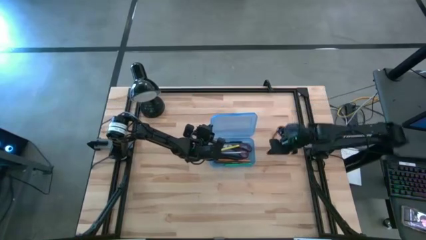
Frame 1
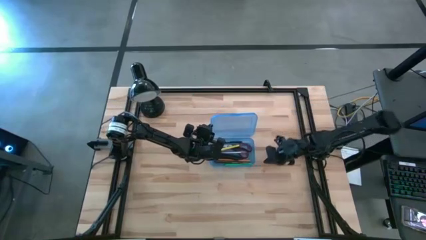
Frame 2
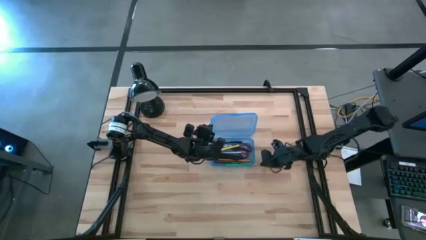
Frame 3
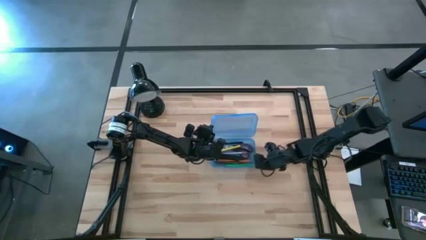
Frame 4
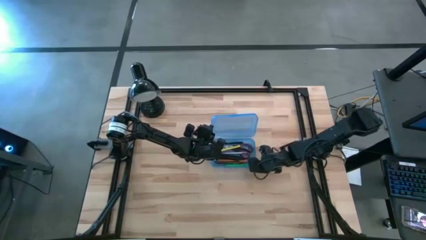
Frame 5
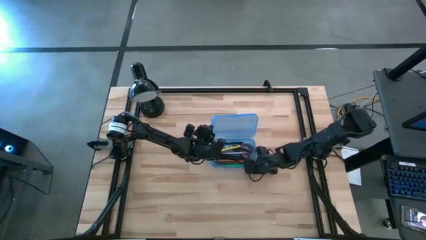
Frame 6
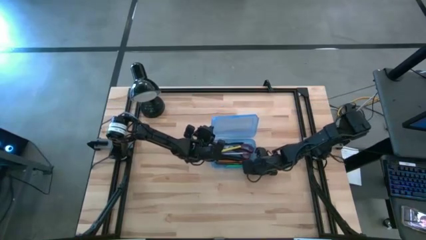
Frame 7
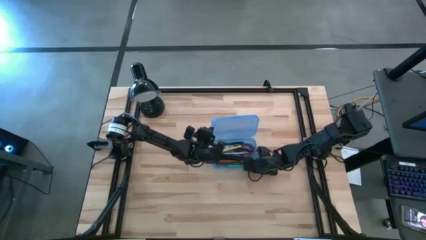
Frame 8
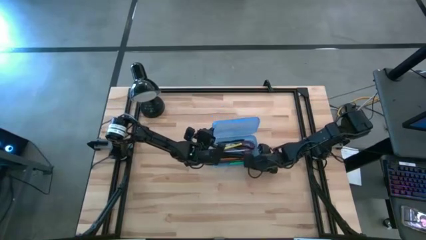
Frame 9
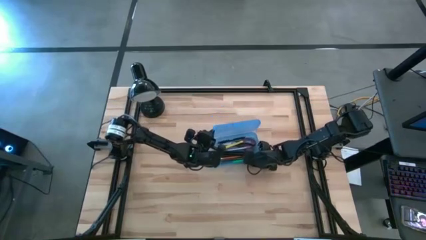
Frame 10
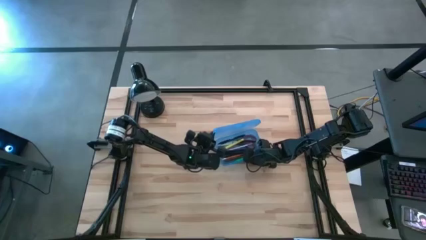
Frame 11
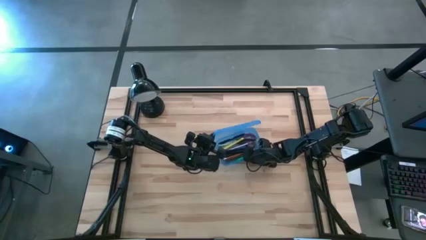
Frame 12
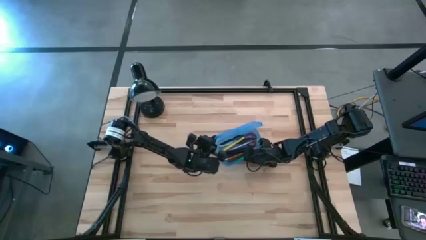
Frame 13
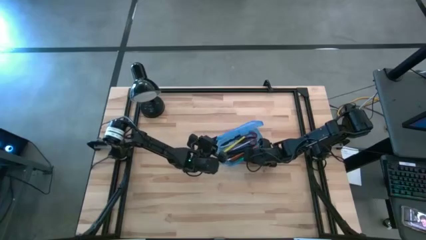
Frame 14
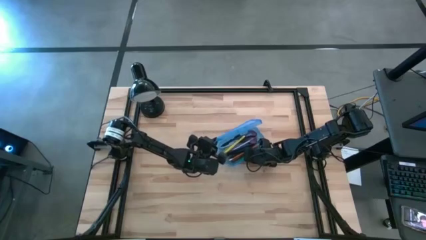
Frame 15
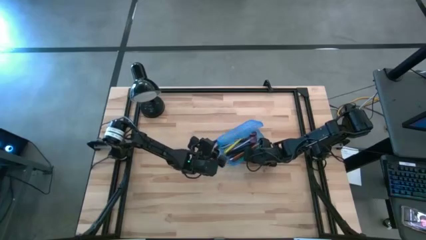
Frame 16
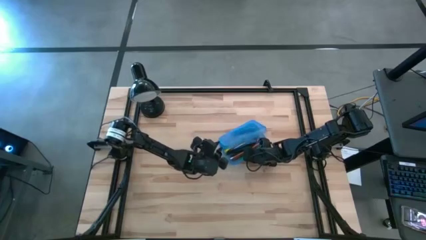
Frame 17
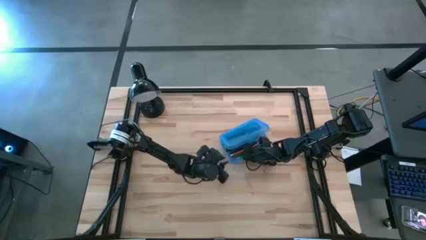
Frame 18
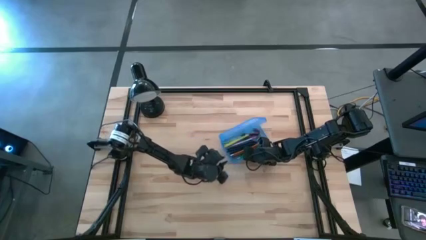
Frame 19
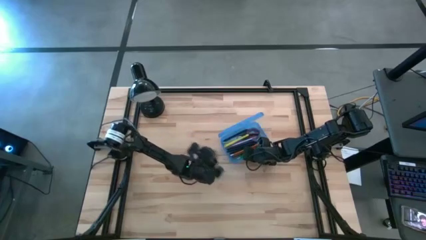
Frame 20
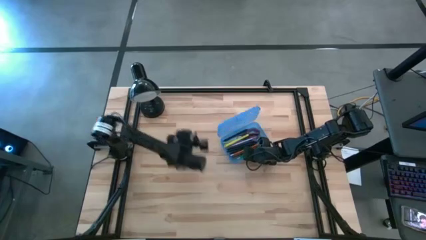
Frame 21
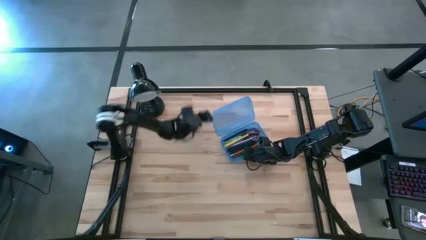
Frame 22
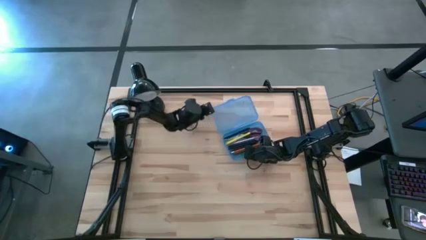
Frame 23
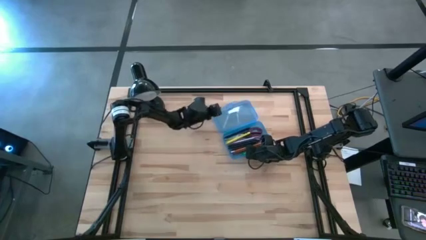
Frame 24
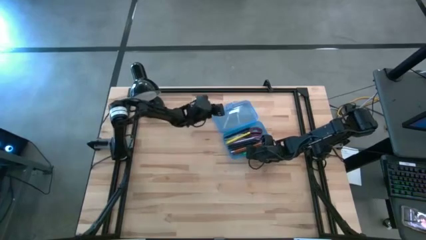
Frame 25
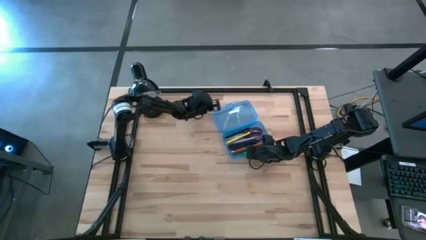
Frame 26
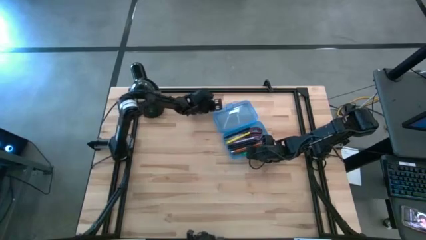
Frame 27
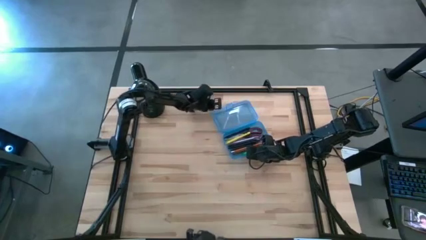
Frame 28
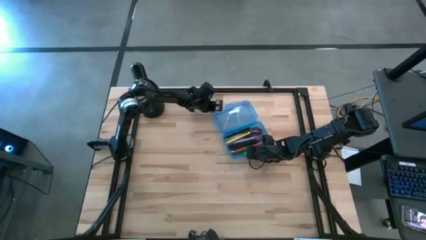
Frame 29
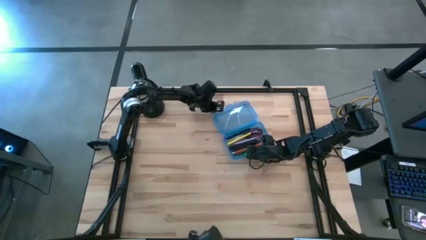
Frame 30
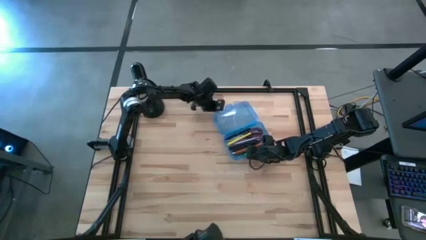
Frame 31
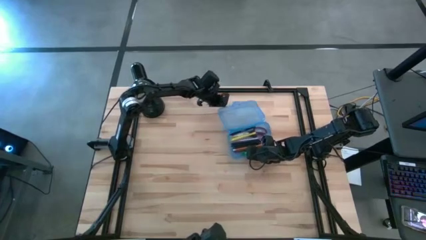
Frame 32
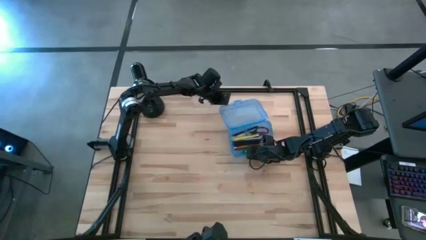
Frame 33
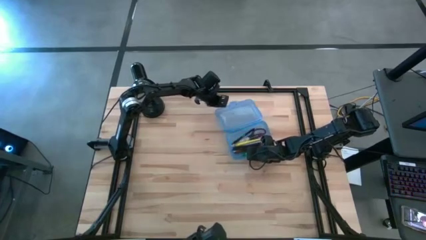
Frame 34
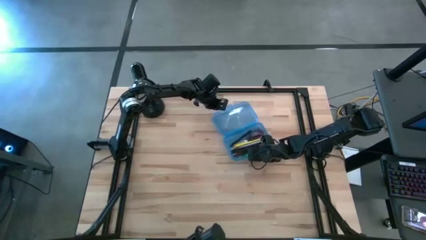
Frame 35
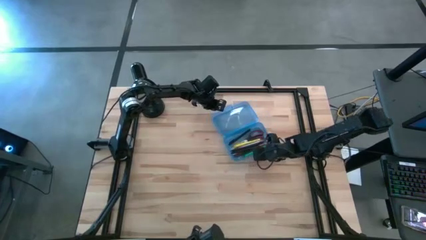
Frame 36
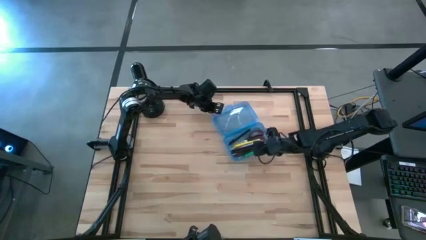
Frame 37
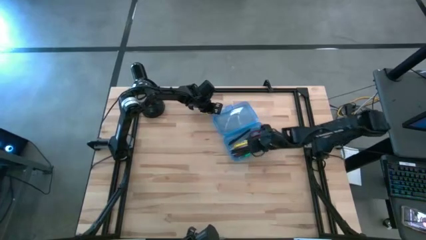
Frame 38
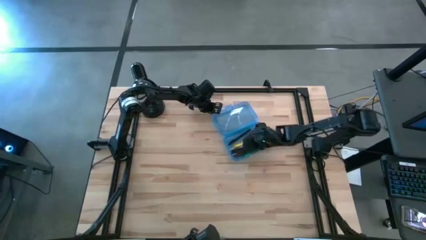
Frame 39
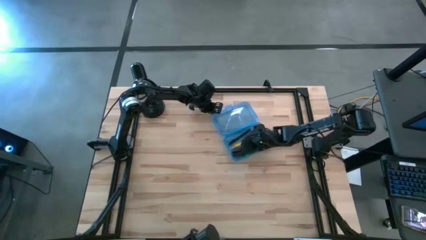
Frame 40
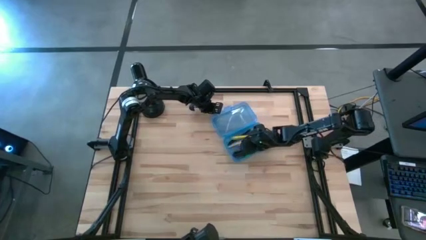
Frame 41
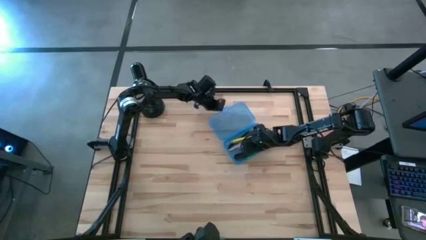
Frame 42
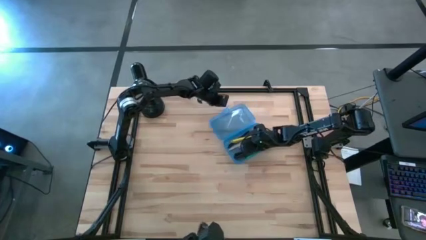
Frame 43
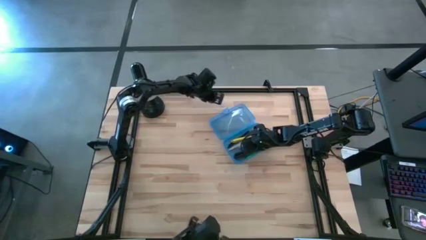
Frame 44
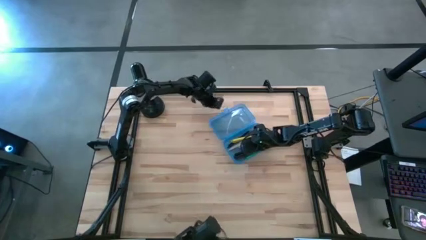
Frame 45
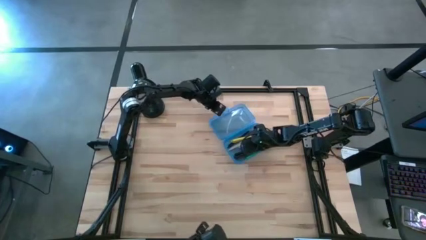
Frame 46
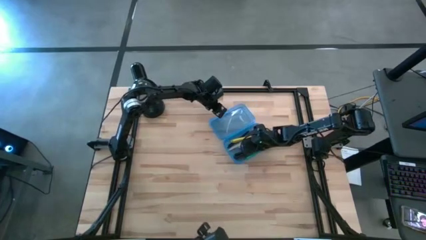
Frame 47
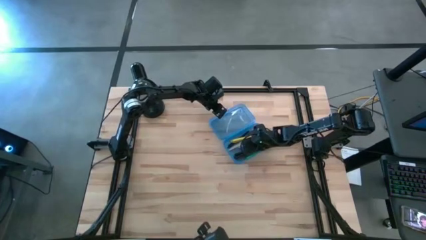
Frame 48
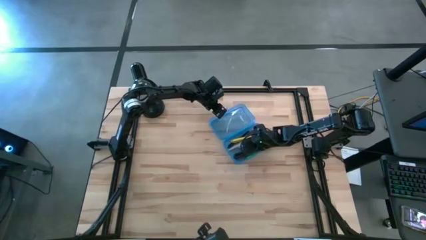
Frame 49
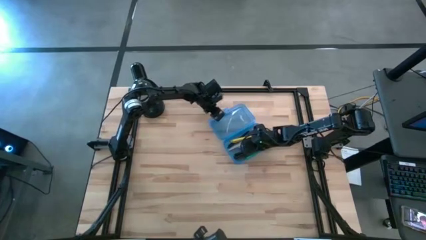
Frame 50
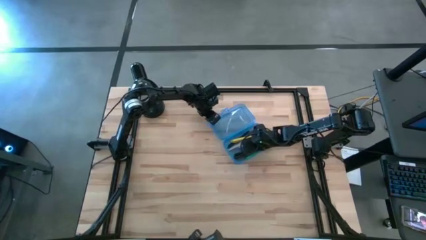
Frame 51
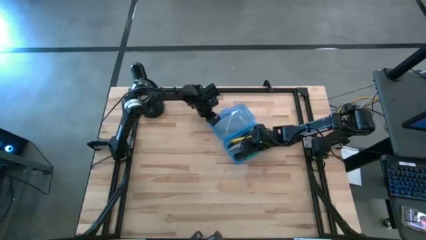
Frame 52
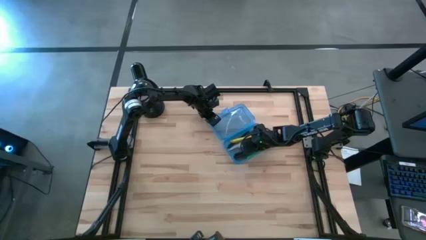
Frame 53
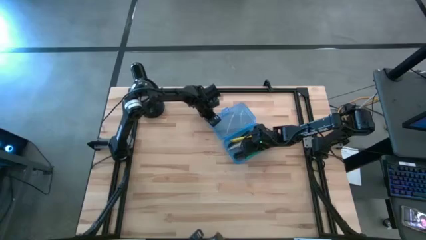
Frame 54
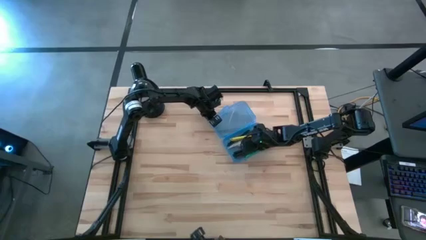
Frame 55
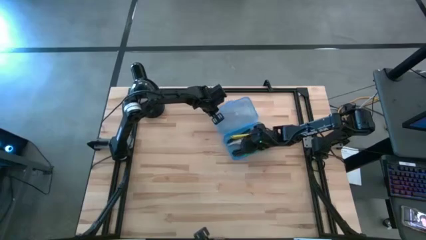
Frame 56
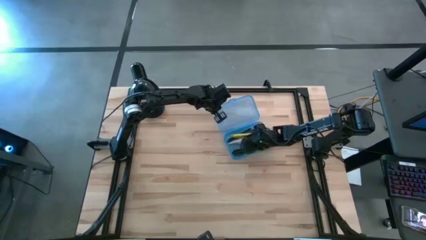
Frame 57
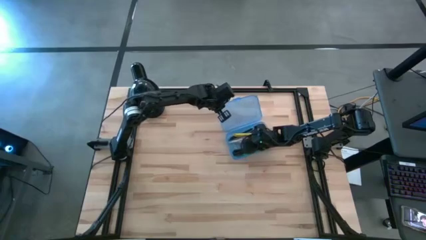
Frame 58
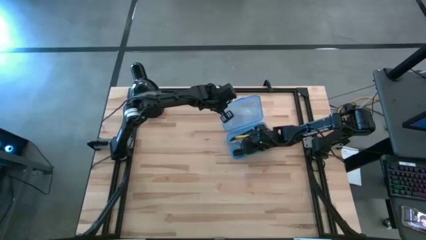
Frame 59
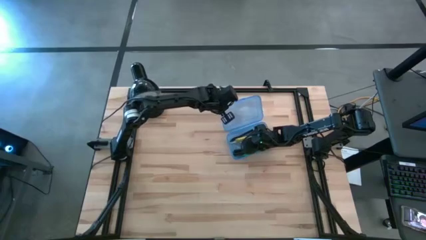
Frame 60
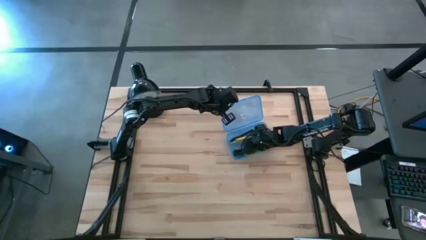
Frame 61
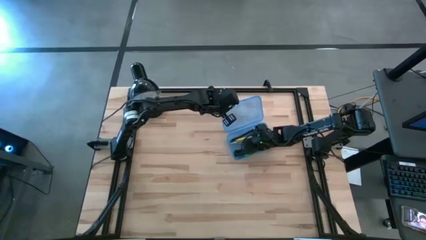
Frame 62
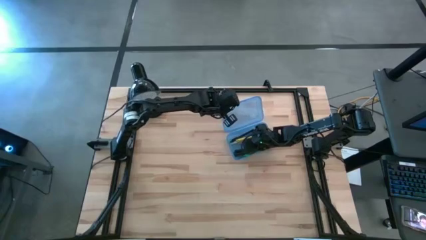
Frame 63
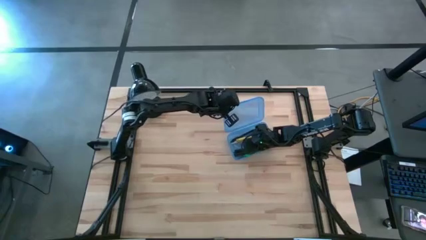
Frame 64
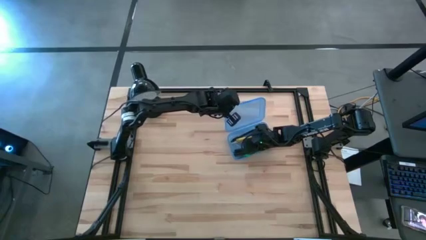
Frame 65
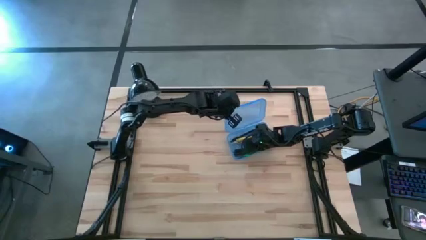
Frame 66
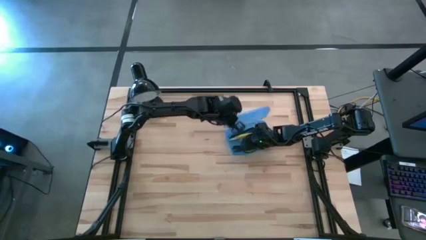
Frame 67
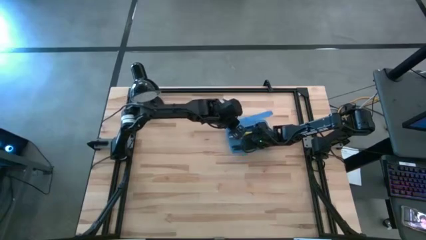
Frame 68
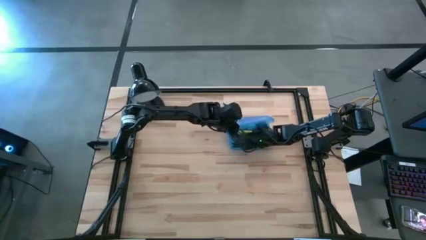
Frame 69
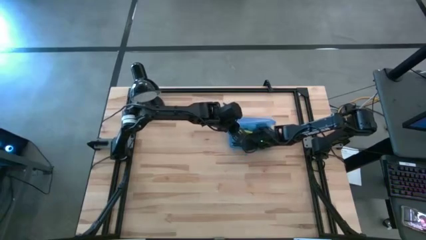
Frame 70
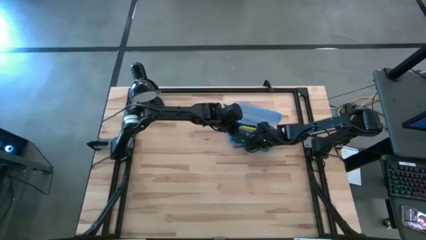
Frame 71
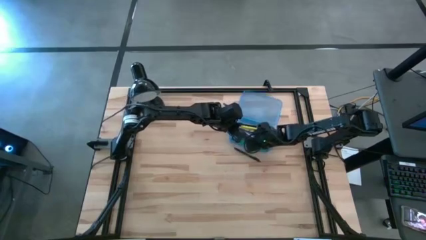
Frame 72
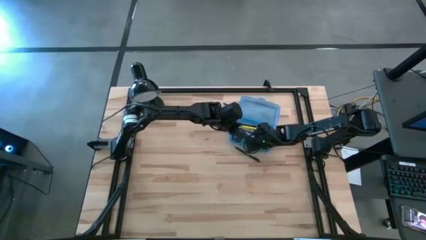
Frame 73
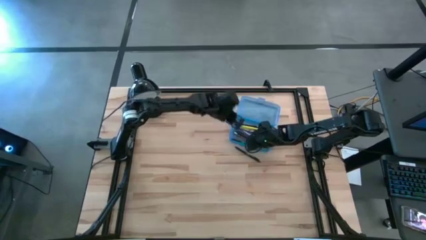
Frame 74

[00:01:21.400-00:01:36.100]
Task: Pick & place school supplies into a supply box
Close the supply box

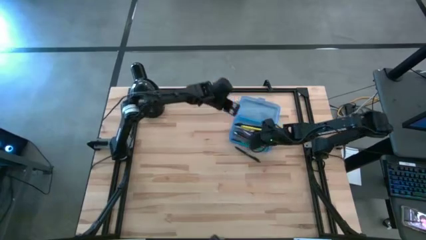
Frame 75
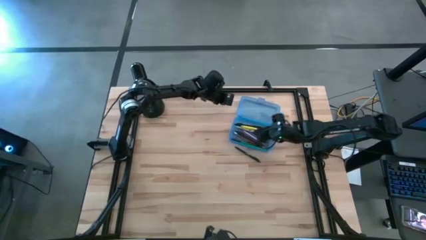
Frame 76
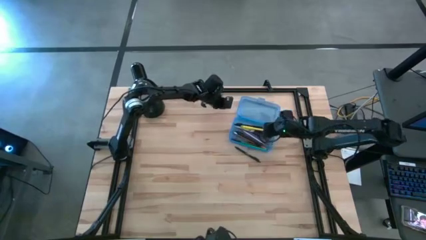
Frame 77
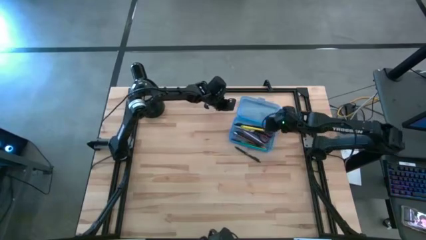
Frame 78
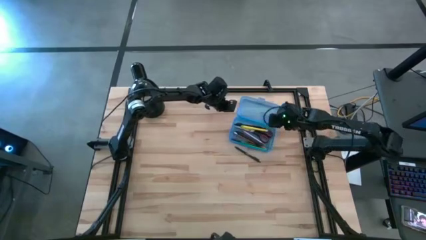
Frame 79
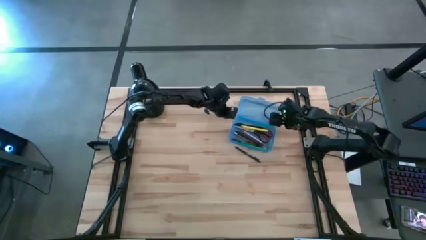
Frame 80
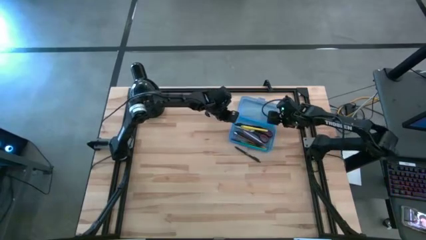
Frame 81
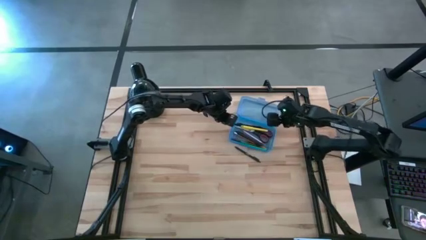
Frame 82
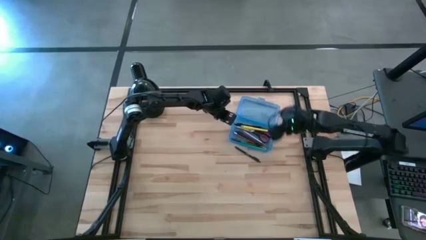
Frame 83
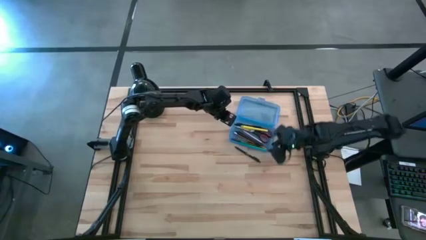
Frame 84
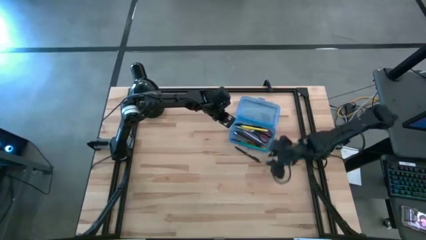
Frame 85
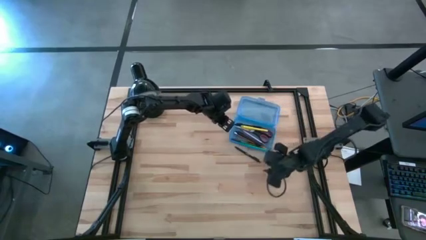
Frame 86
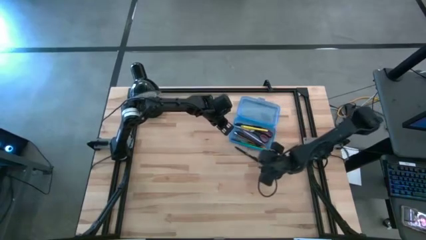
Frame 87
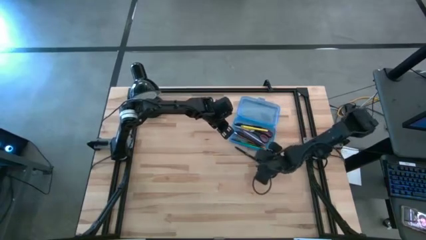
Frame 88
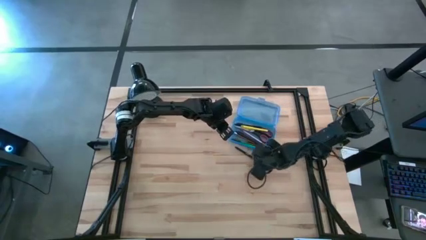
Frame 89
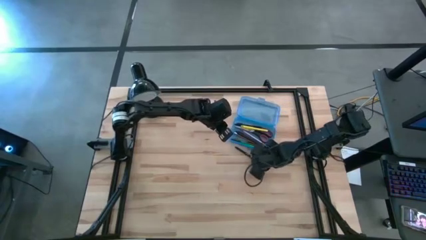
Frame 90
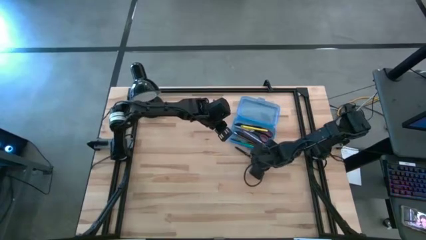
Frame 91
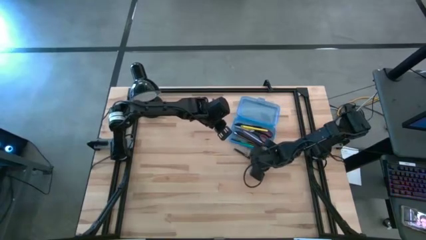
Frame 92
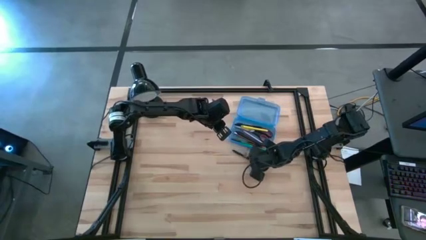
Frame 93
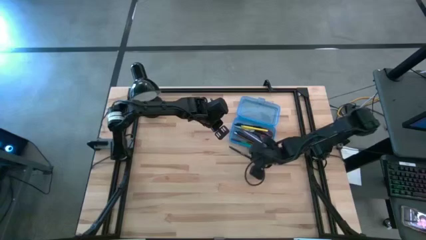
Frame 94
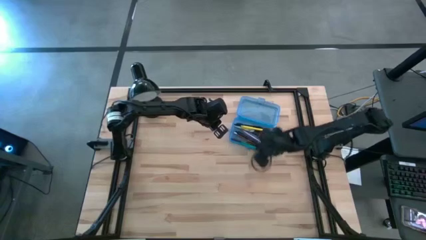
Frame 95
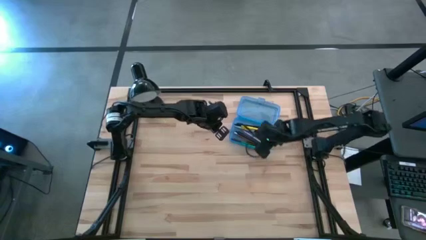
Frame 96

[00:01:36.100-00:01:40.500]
Put the pen into the supply box
